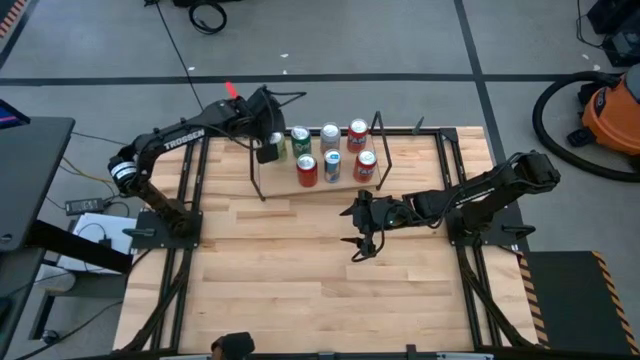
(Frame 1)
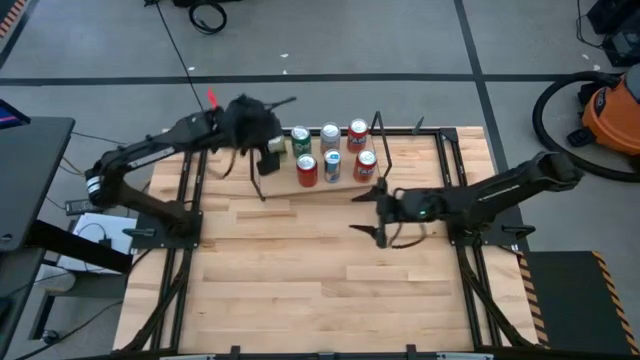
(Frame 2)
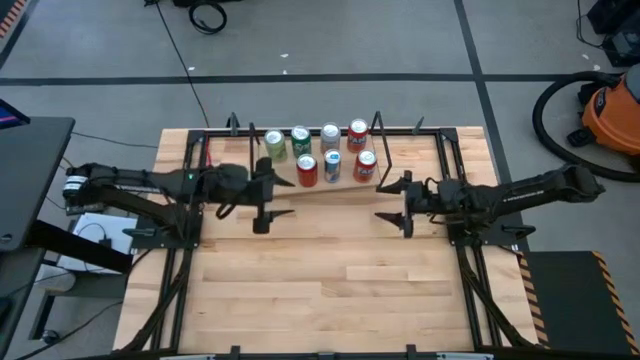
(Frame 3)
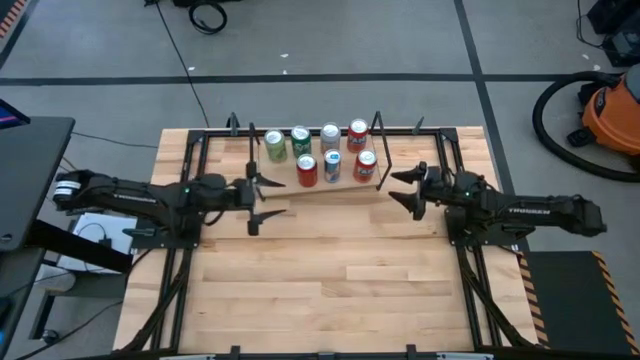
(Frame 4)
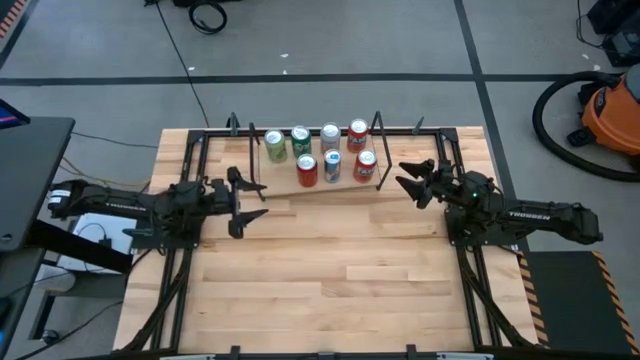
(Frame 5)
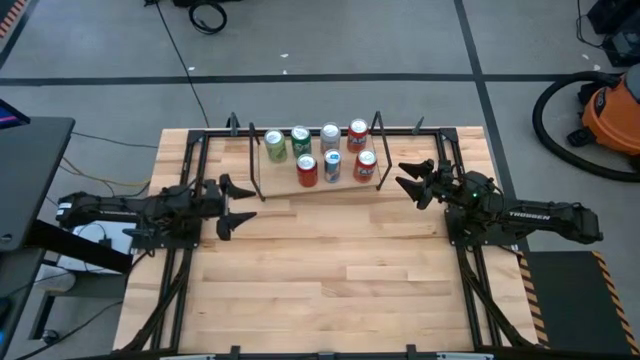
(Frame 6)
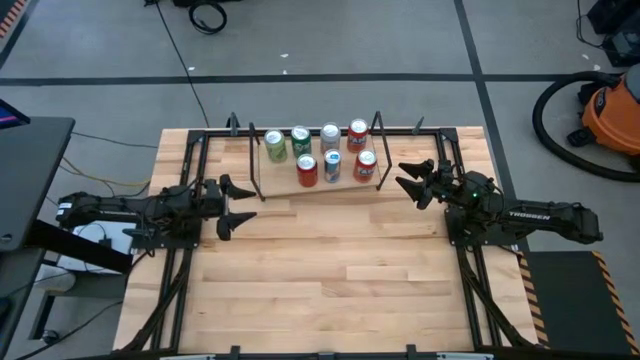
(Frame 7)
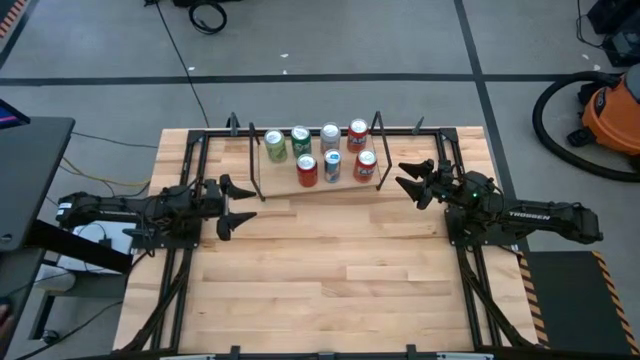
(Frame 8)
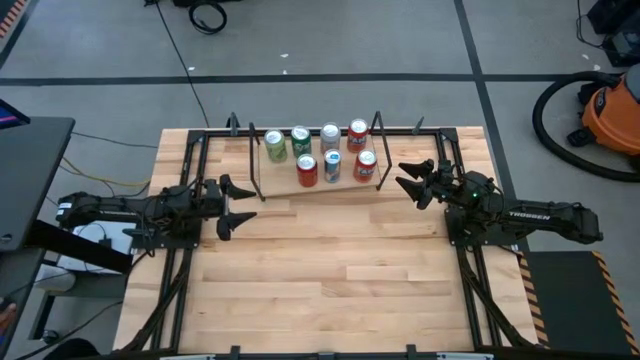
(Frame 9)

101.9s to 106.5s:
Task: Place canned beverage on shelf
Return to Home Position

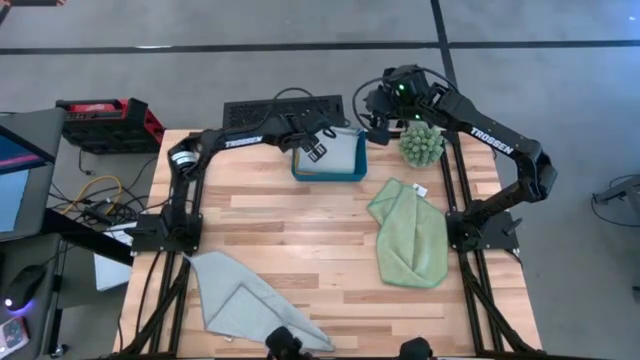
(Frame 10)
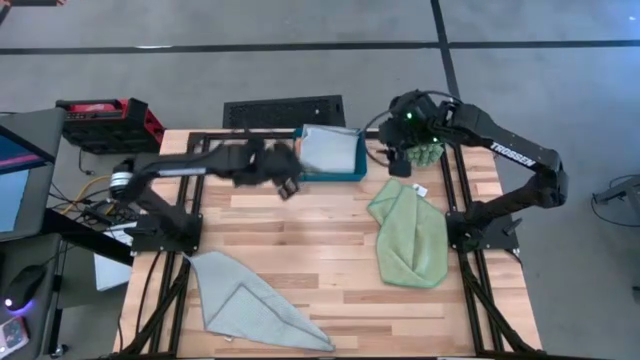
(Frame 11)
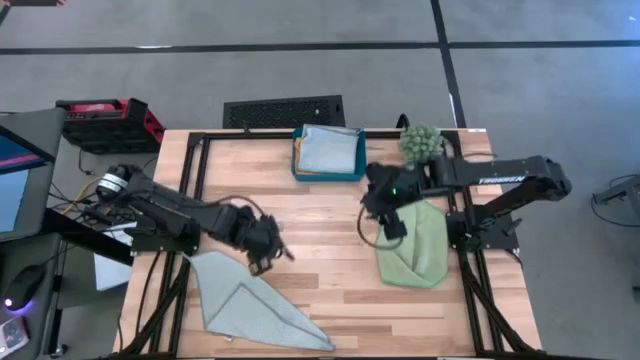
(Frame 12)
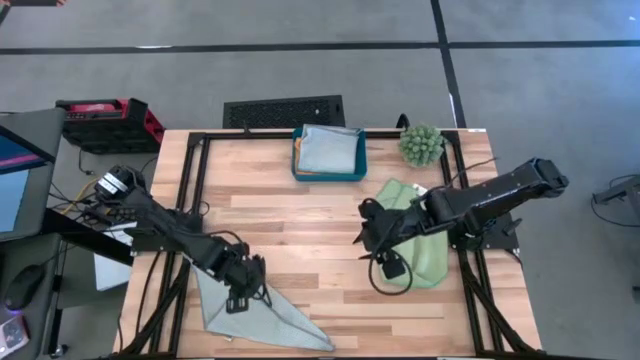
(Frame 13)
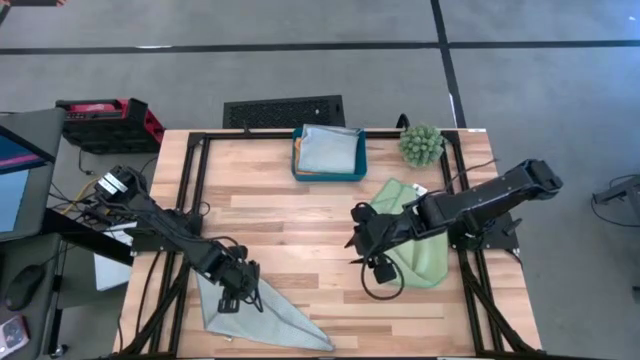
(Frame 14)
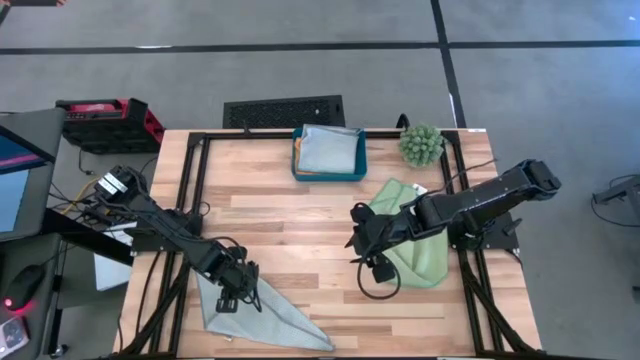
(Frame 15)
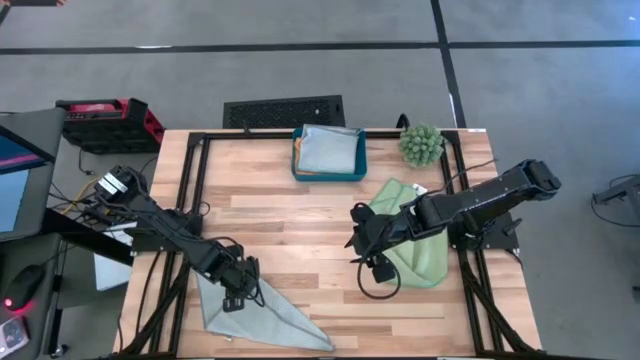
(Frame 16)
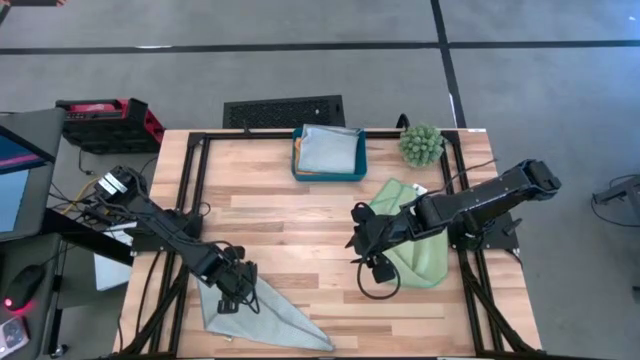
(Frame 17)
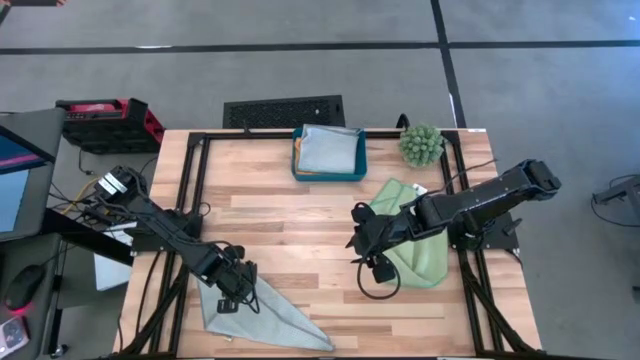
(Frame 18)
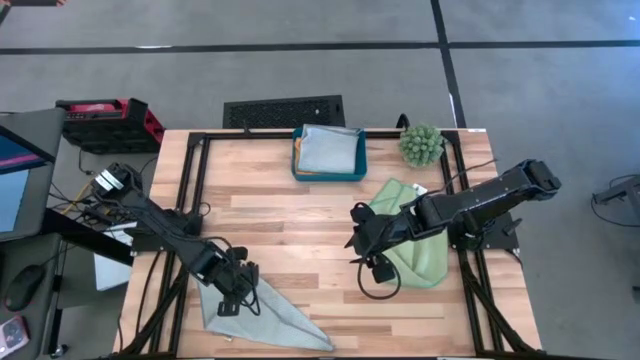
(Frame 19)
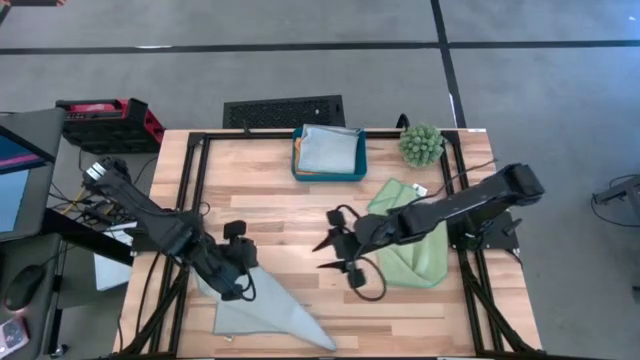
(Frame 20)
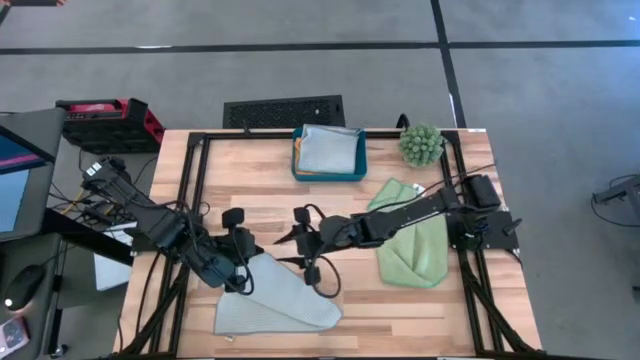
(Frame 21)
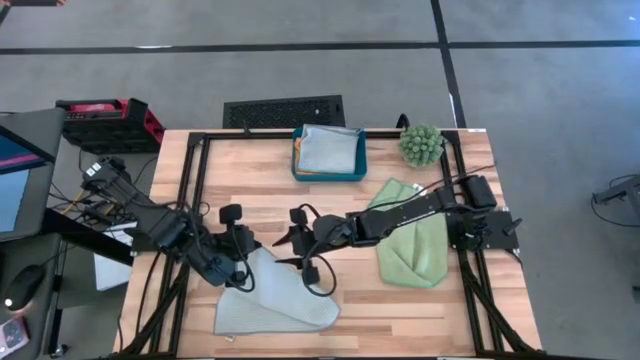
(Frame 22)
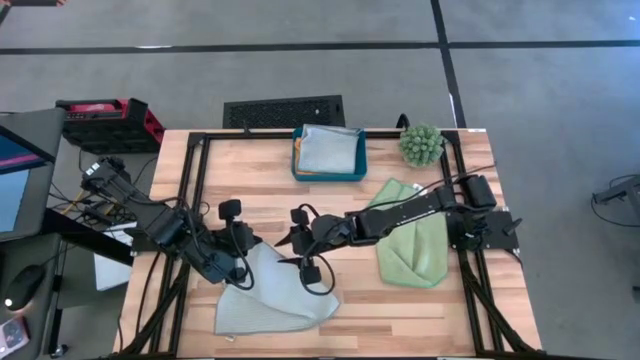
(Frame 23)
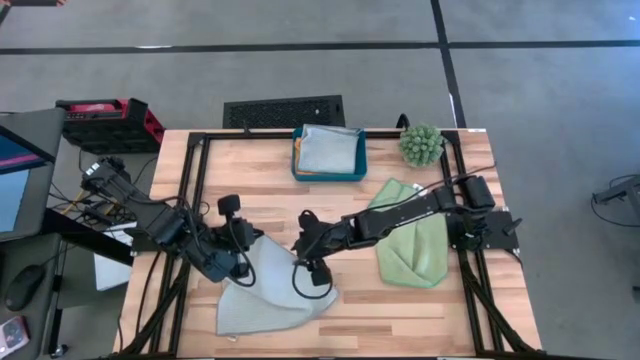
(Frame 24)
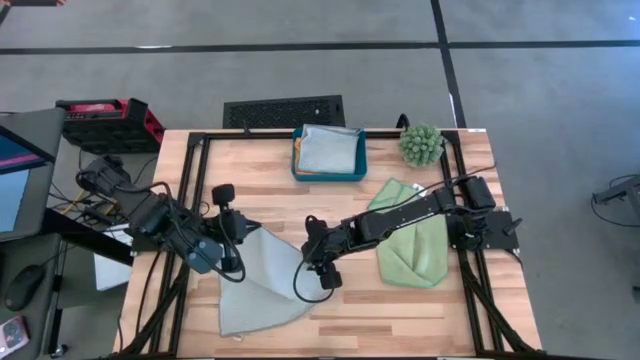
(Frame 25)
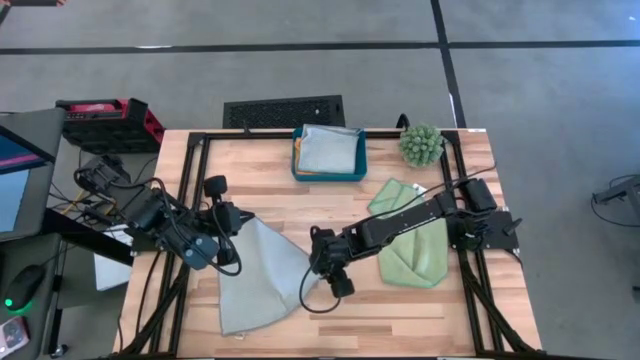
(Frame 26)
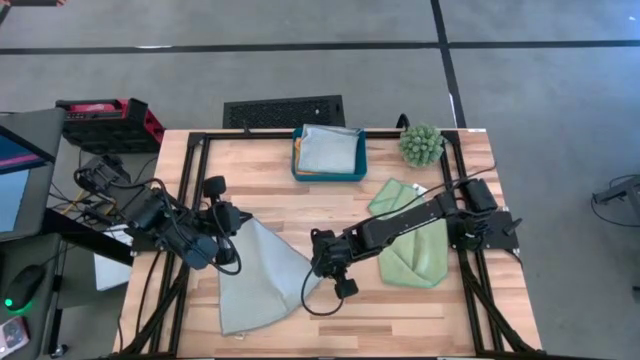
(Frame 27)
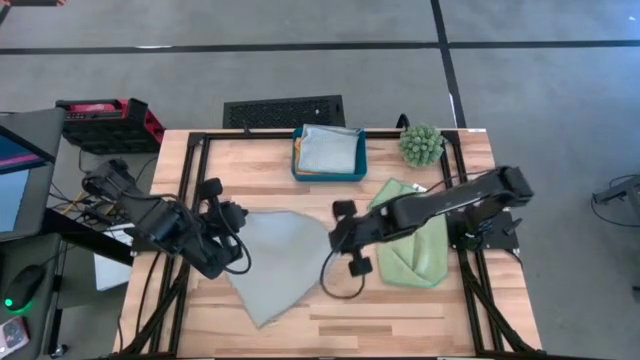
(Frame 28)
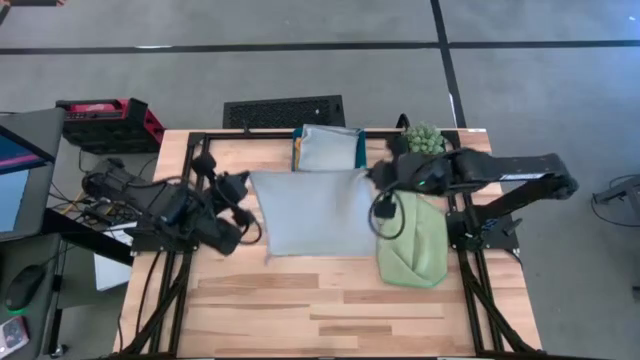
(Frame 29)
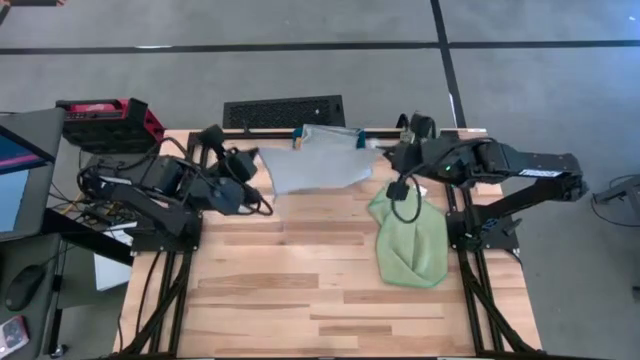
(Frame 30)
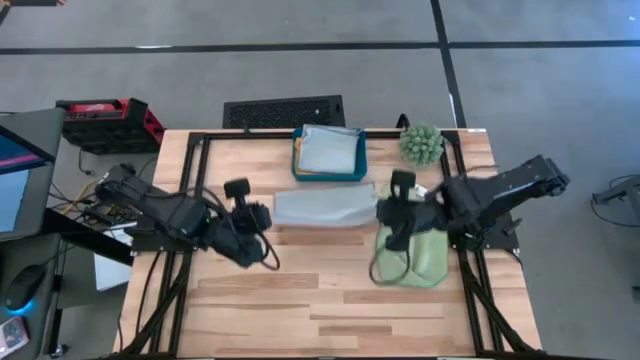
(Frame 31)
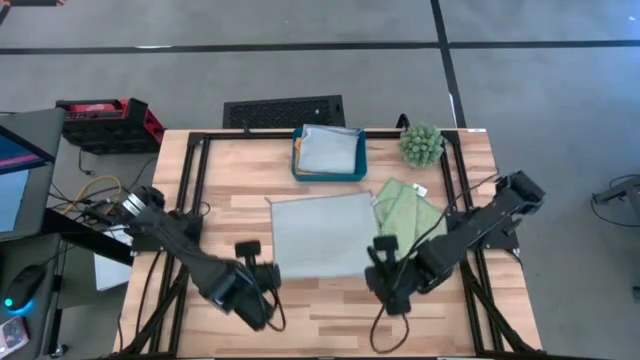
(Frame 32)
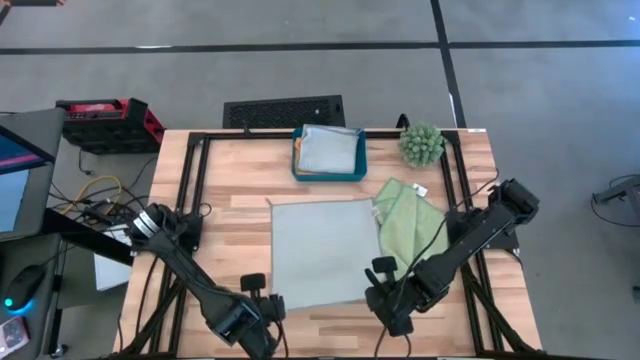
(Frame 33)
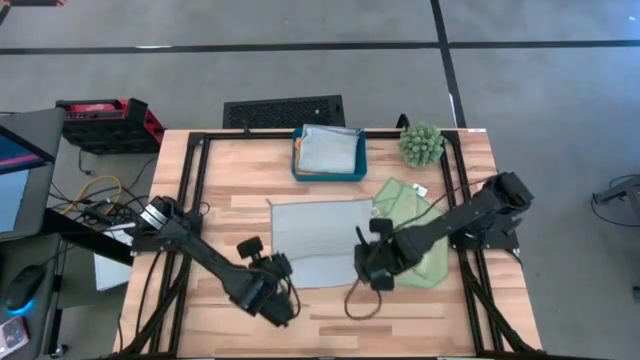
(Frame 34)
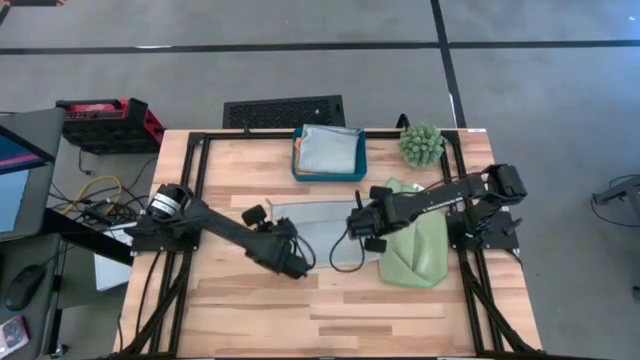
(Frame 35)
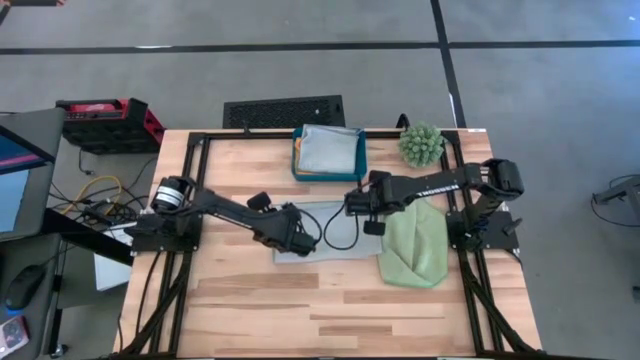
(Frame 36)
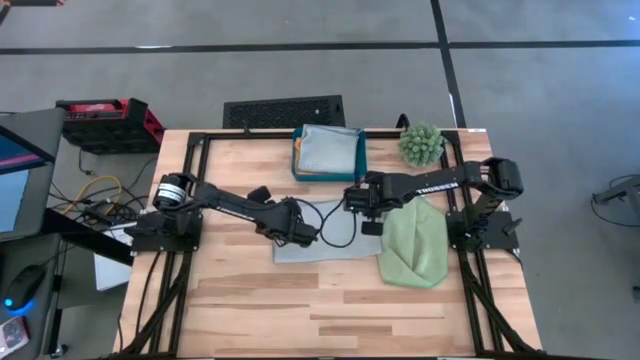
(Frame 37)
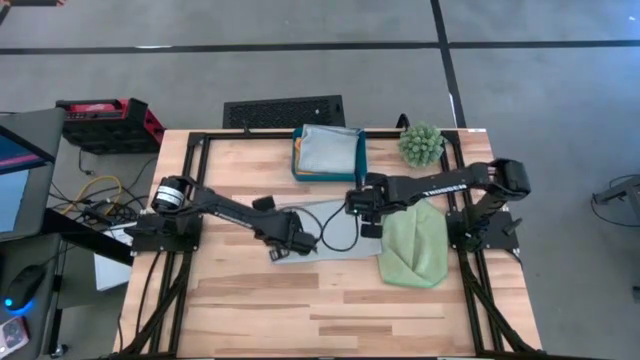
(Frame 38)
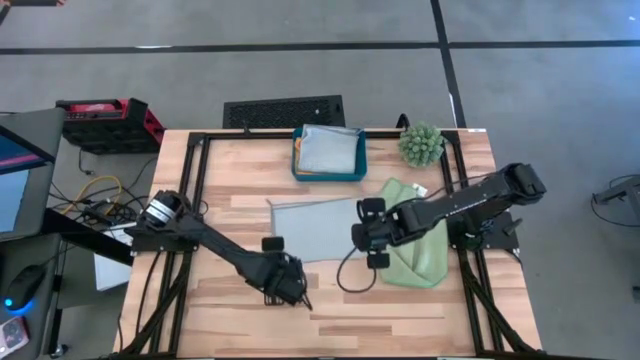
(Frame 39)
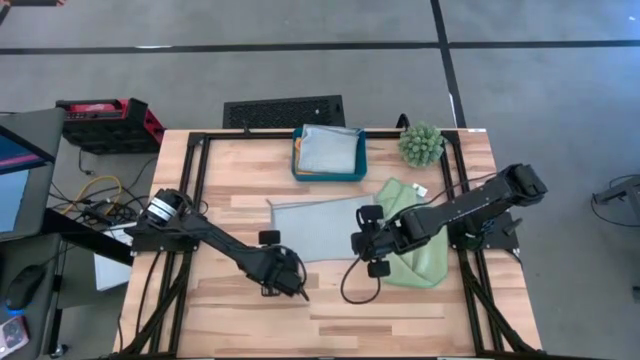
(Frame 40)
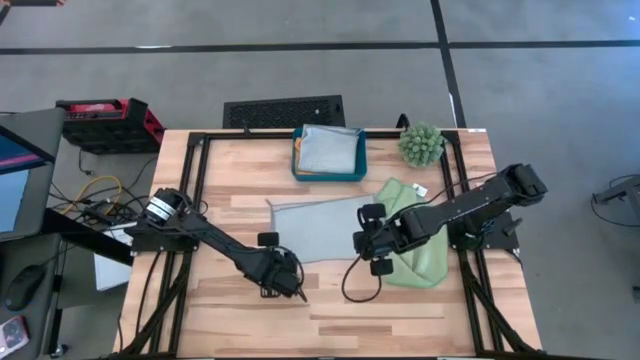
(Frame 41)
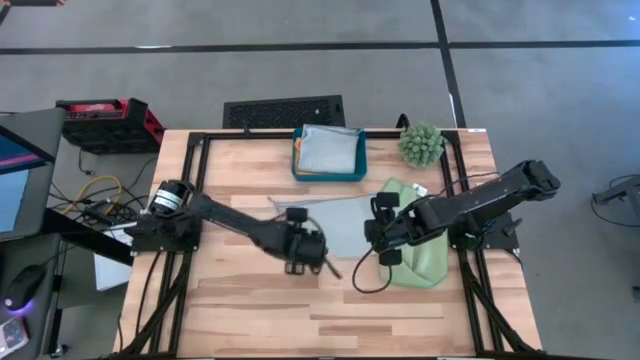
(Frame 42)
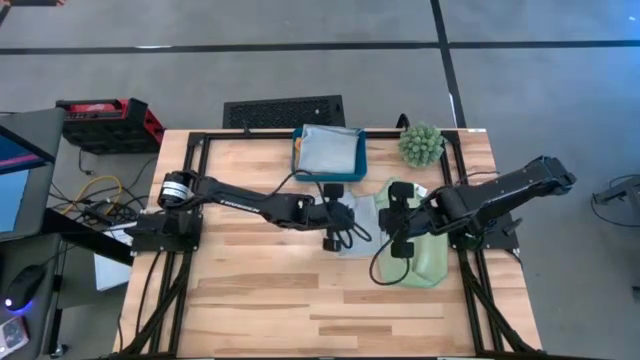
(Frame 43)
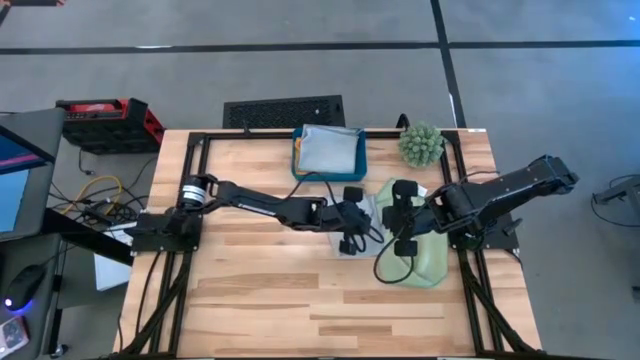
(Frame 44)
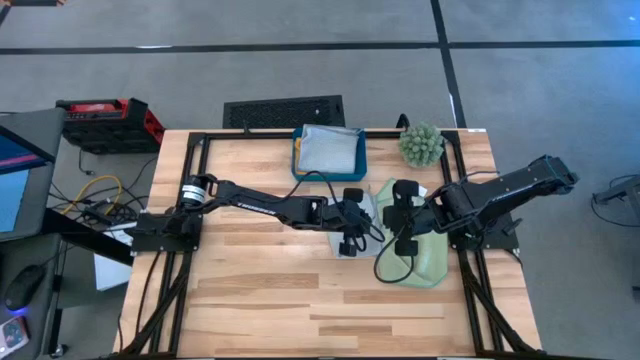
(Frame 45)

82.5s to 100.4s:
Task: Fold microfiber towels
Fold the gray microfiber cloth
